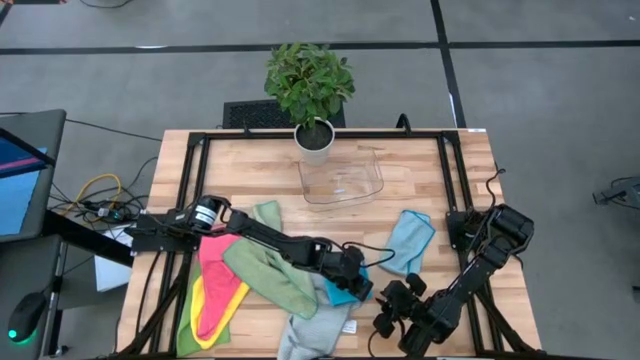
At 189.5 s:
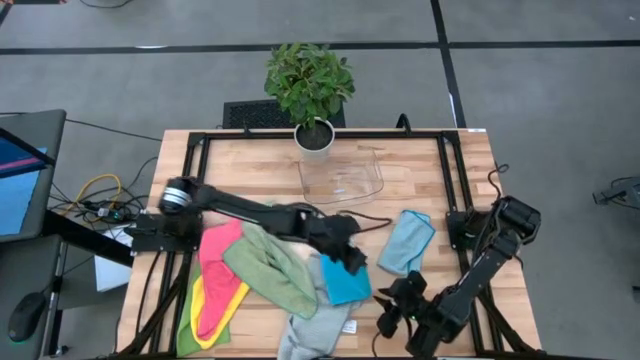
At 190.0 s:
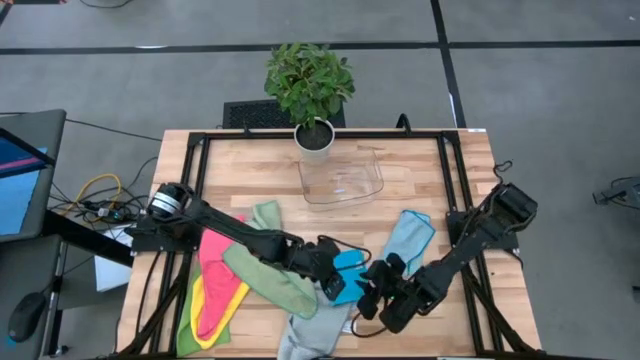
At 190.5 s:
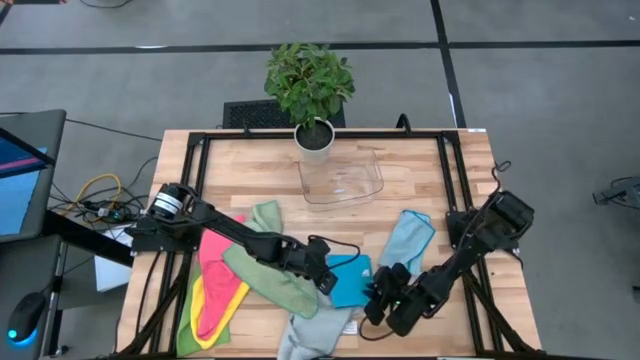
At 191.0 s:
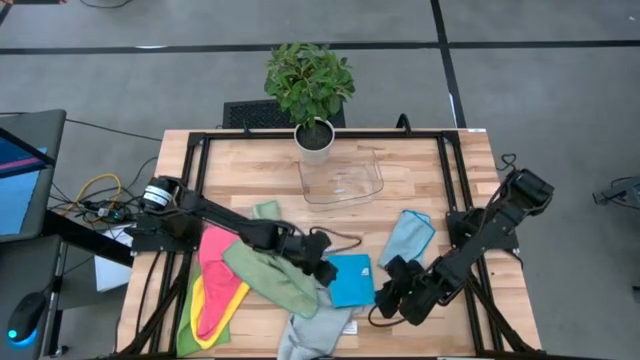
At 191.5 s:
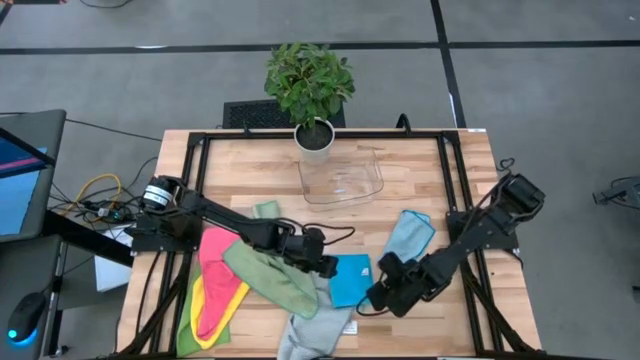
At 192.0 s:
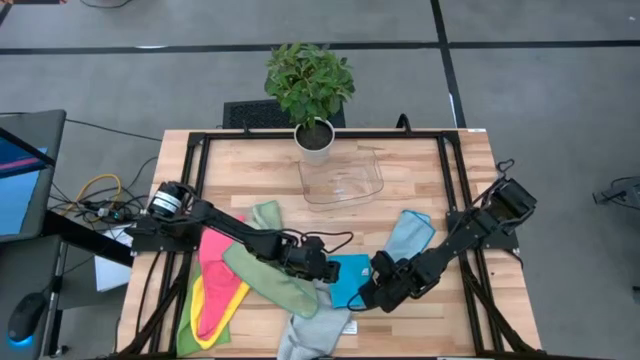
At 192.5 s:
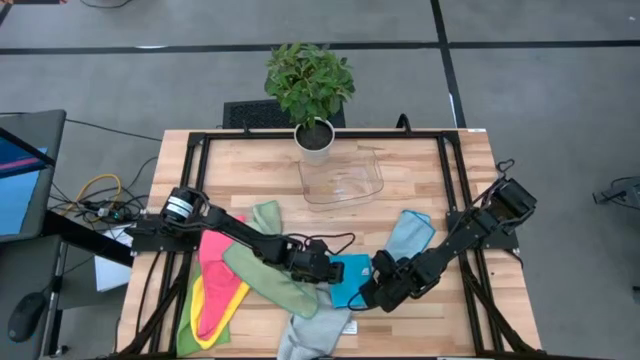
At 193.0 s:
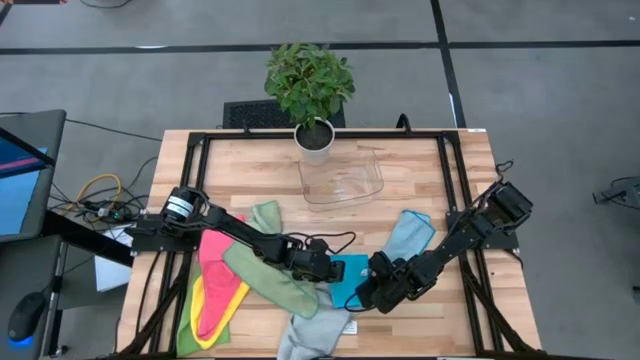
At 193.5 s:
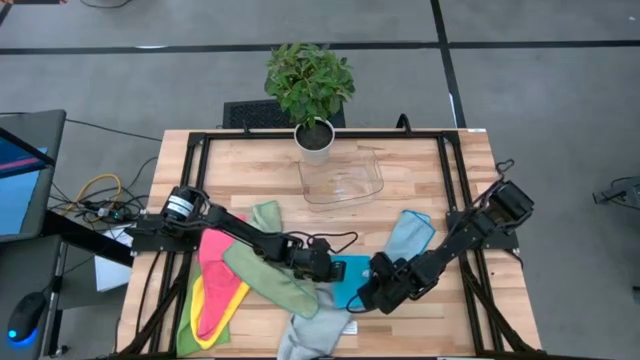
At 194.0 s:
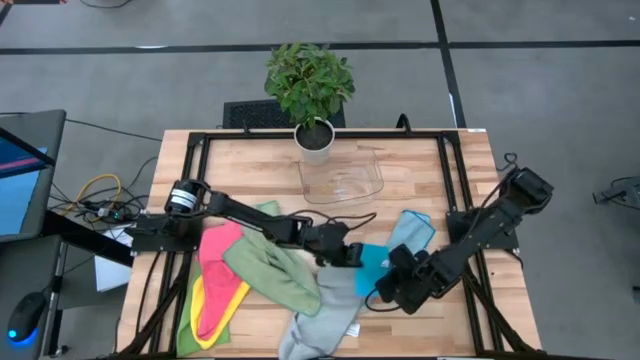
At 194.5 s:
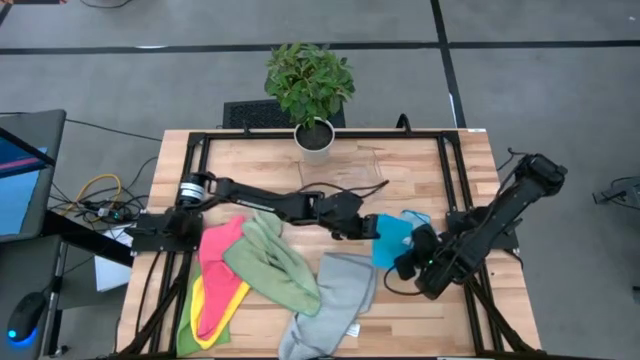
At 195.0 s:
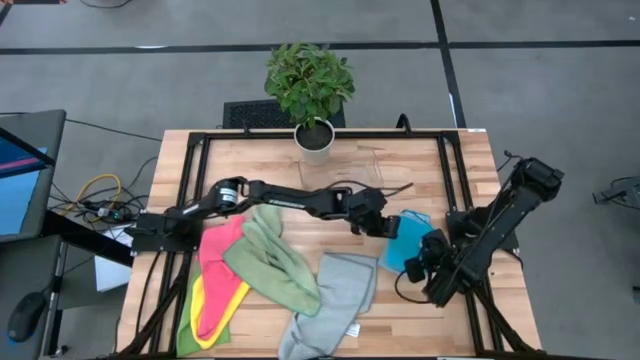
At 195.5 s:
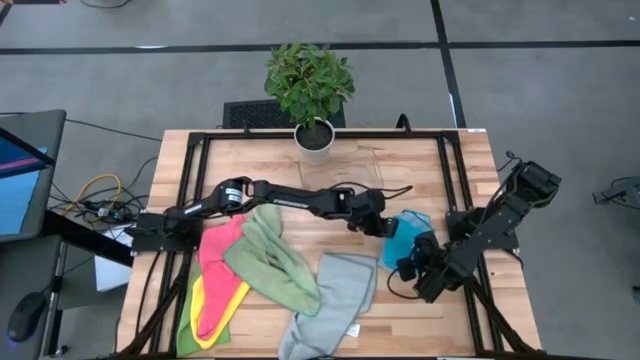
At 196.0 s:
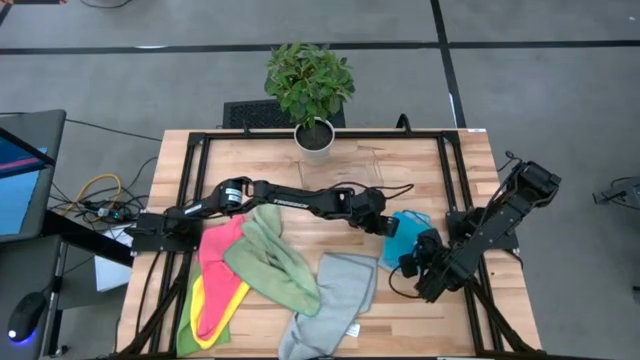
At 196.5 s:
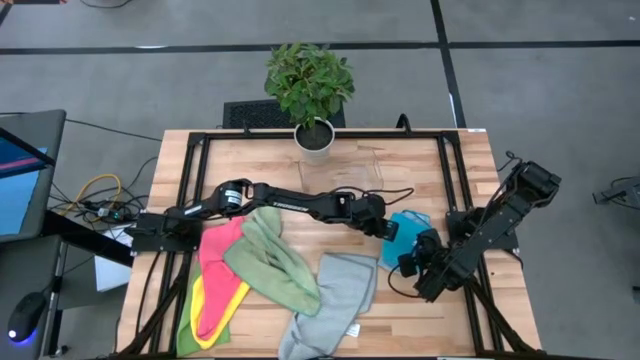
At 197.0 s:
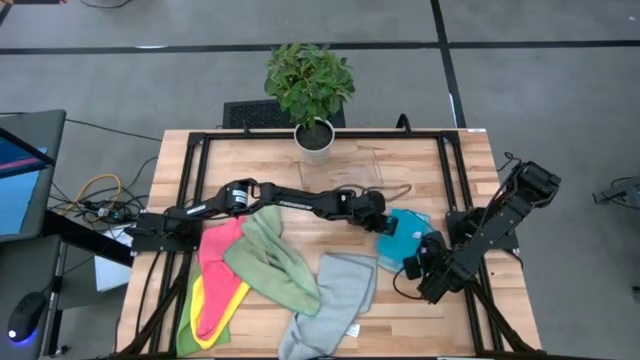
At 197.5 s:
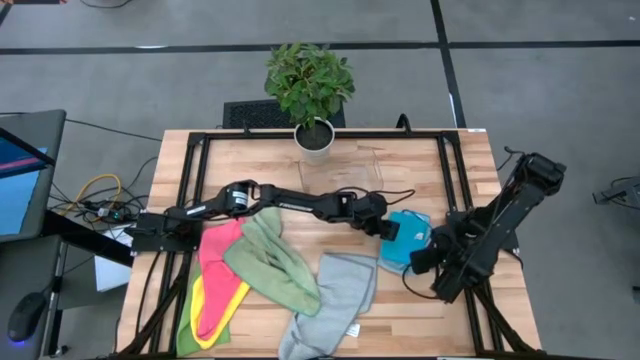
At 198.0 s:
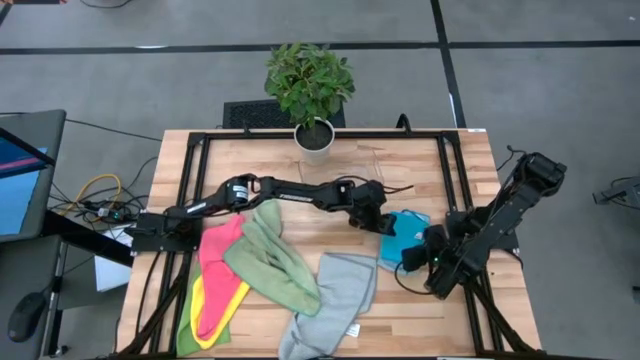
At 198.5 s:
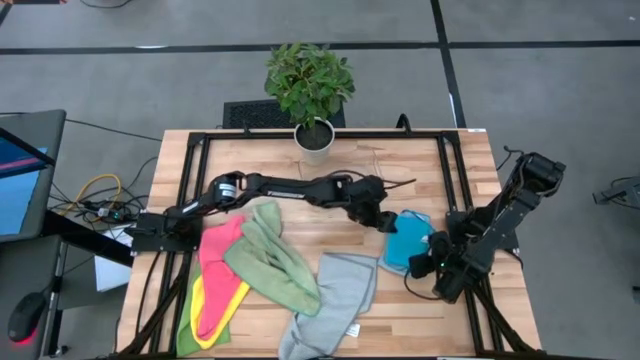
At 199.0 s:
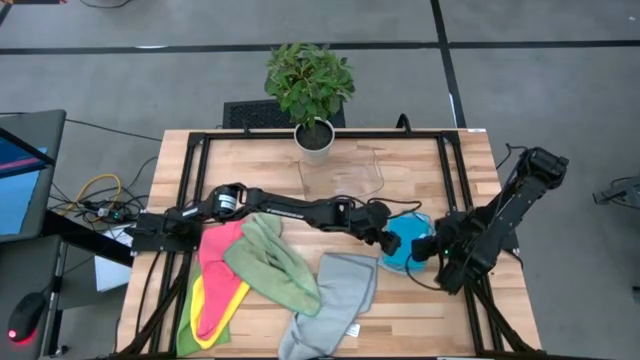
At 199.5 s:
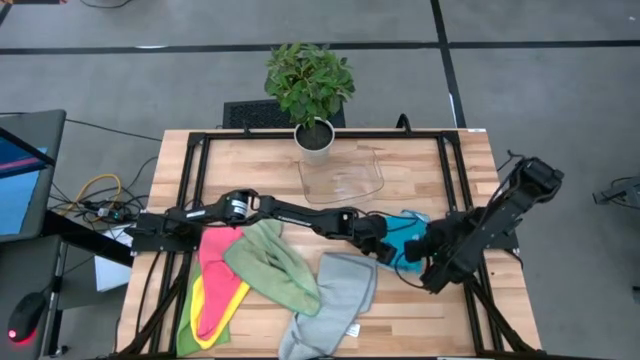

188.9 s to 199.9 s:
Task: Fold microfiber towels
Stack the blue microfiber cloth on top of the light blue microfiber cloth
